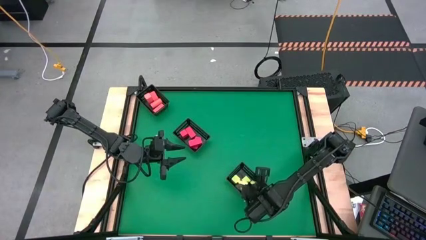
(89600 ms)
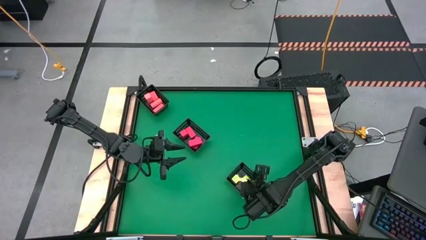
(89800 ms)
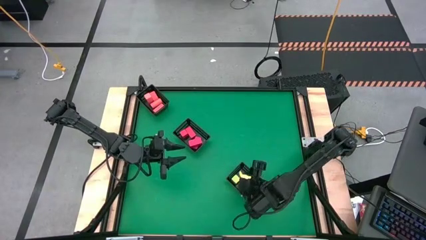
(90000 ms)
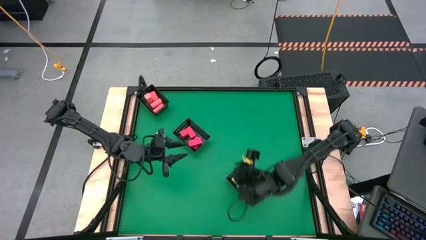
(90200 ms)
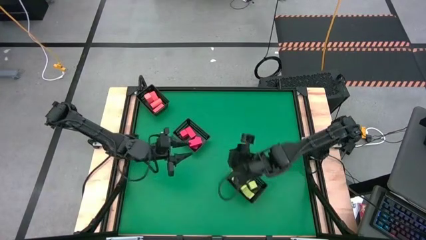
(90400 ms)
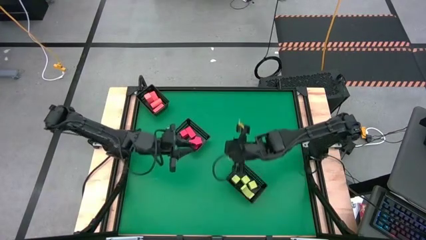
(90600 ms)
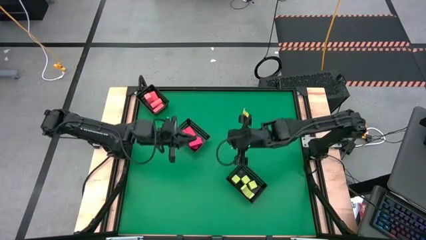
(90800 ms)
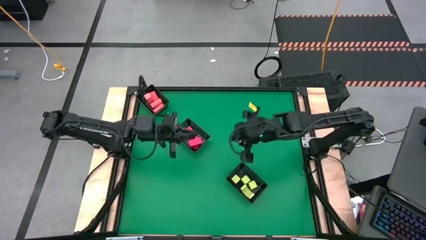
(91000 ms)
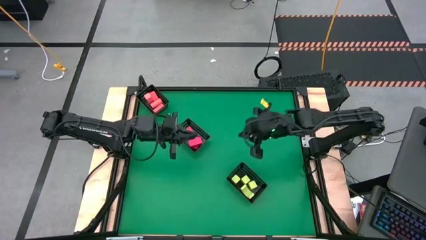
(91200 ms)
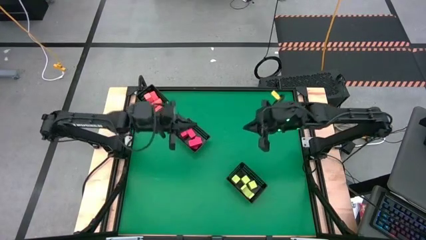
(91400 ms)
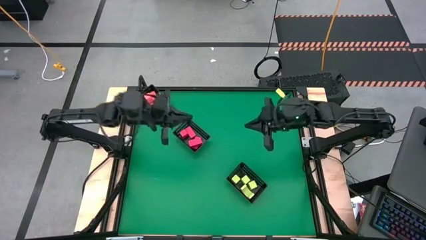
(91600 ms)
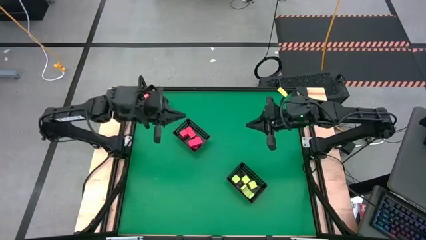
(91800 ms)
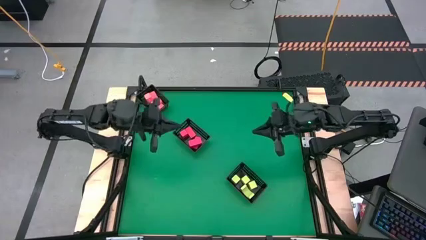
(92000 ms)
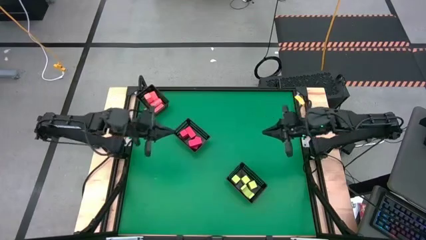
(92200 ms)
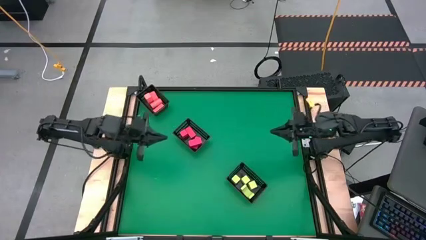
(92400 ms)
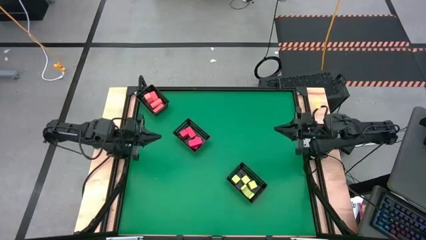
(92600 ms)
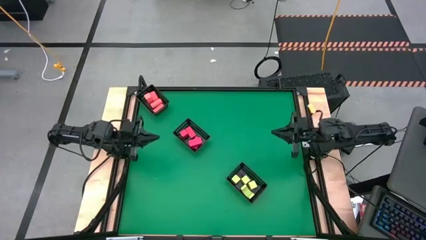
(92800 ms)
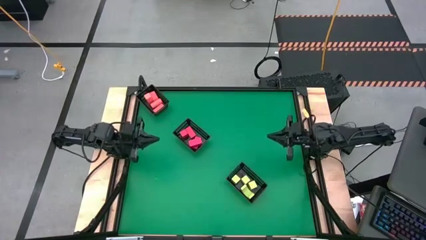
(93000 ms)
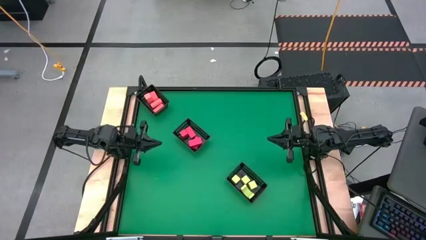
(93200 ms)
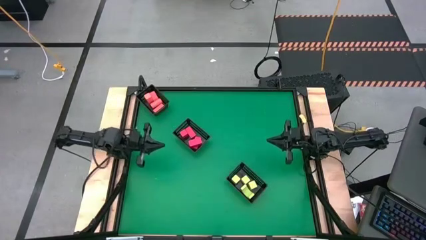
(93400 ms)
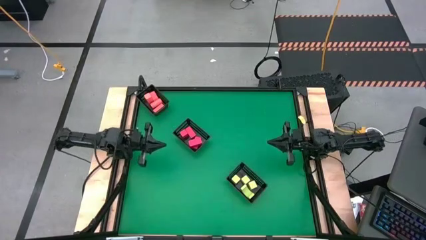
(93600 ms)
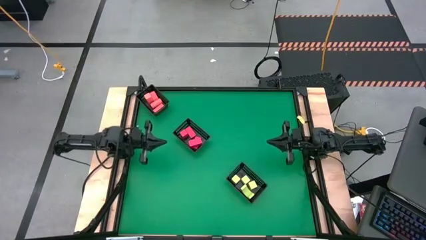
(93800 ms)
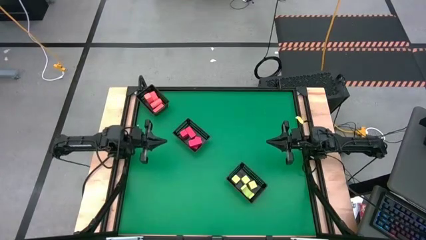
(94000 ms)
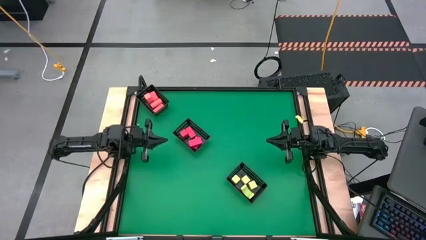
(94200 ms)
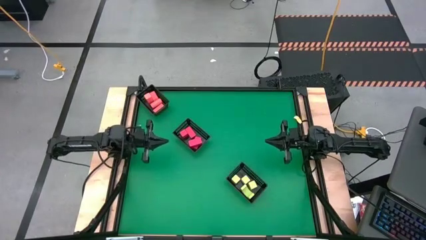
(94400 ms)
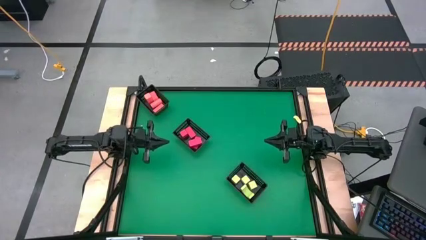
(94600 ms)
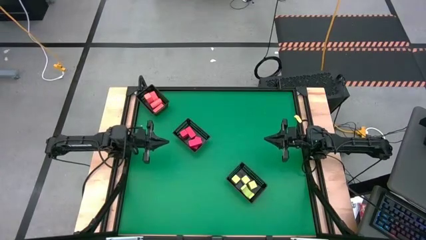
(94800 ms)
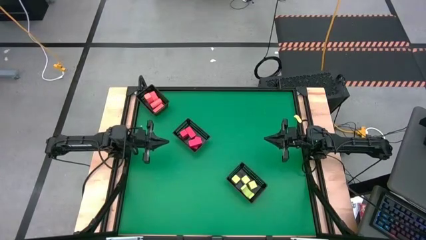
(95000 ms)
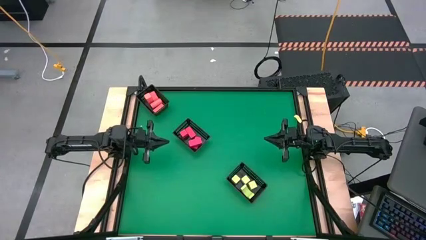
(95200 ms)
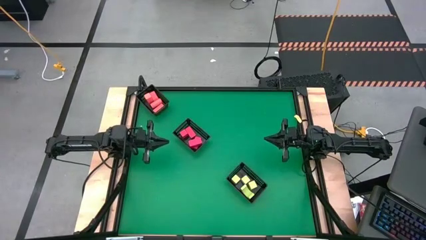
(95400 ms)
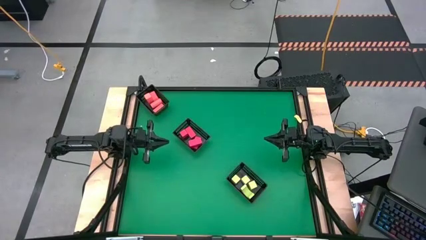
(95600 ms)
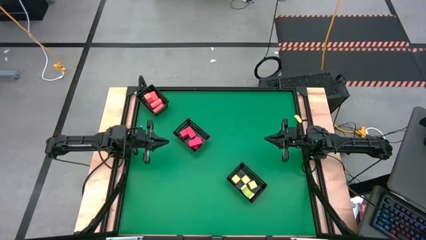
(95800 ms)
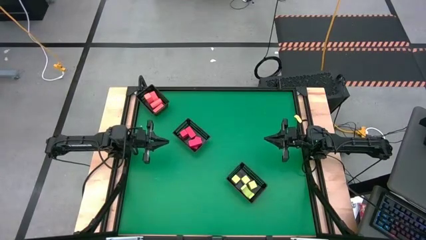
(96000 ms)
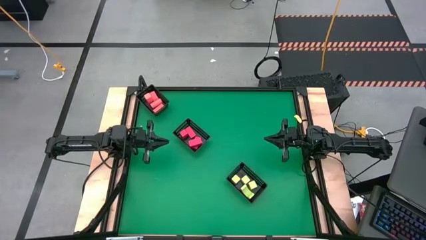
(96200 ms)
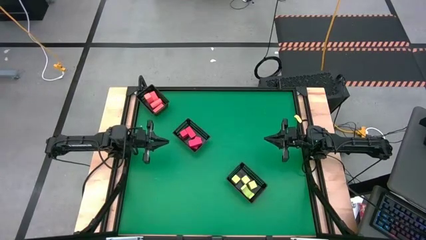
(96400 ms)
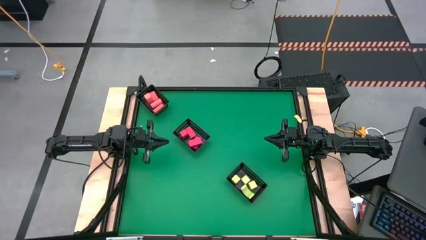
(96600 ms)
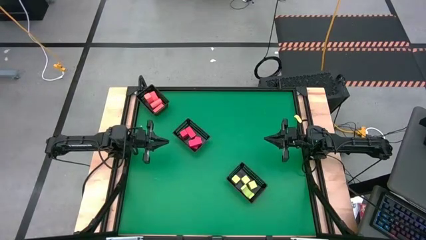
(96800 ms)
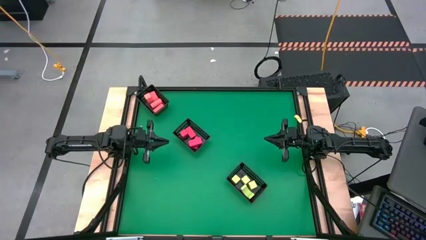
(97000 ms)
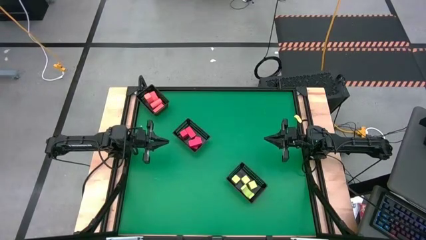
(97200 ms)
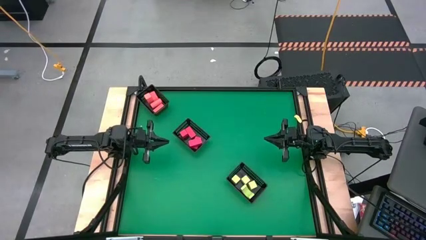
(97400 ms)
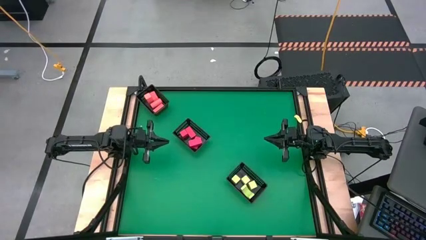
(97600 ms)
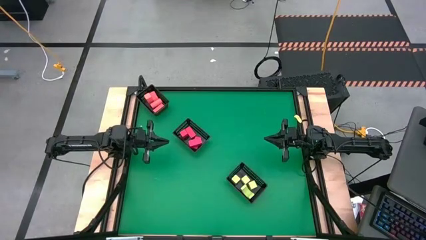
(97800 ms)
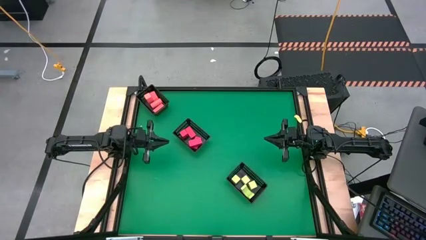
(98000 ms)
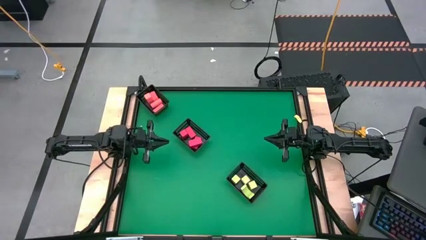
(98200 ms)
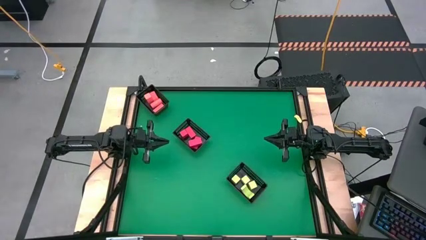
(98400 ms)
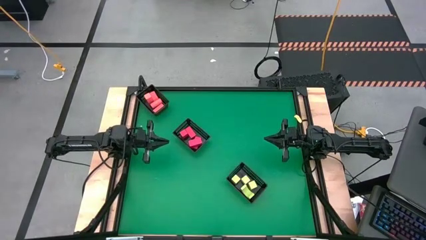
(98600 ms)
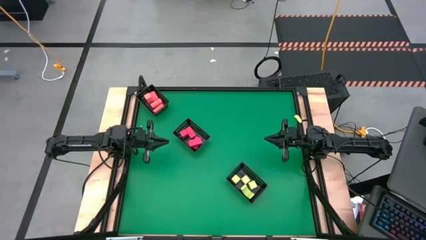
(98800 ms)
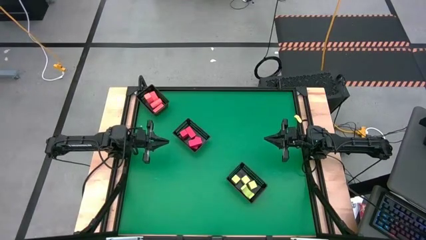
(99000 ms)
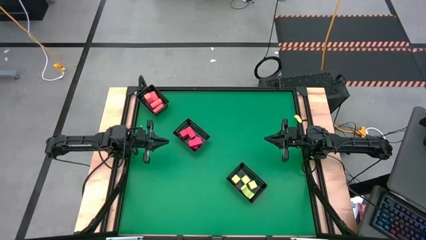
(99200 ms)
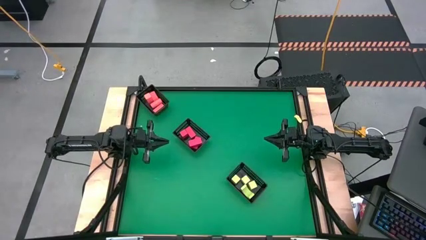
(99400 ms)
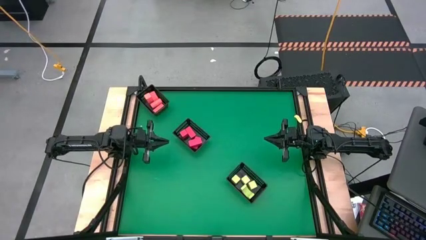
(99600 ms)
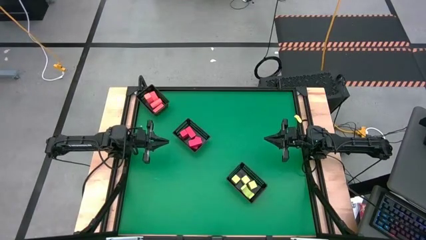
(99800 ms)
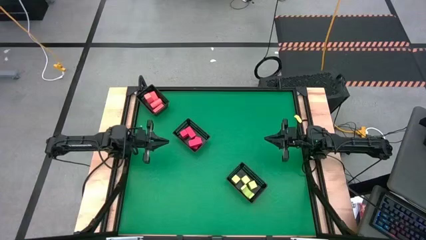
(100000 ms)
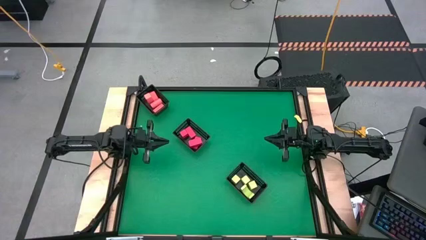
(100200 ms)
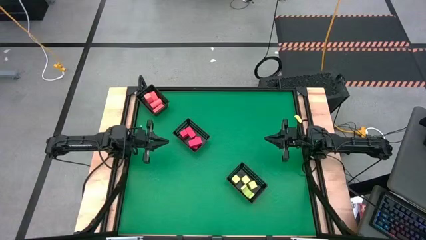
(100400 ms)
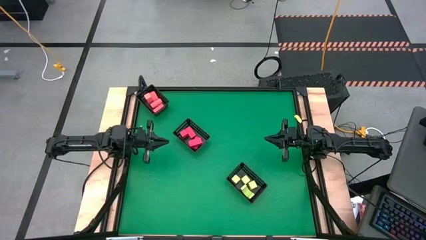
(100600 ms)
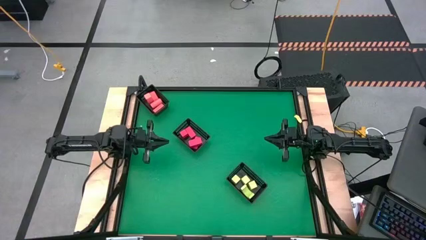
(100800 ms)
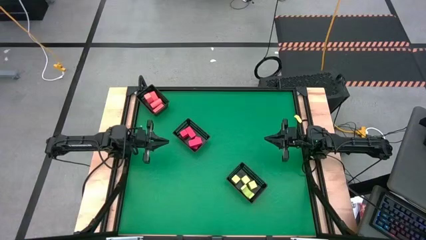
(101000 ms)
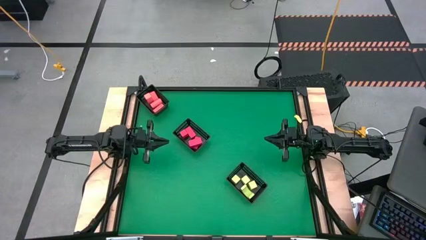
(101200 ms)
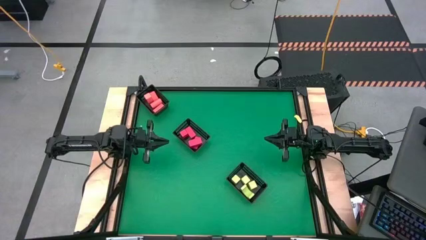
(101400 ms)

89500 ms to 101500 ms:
Task: Sort & place blocks by color
Return to Home Position

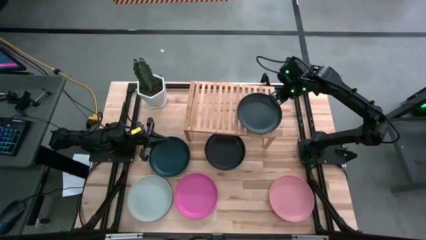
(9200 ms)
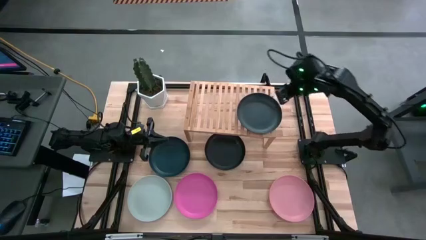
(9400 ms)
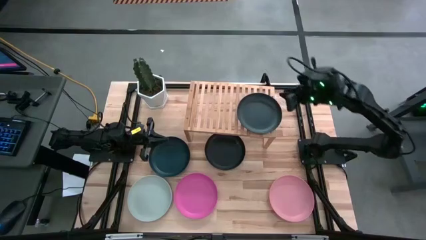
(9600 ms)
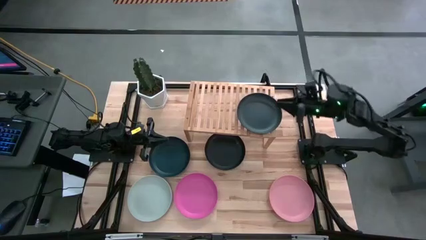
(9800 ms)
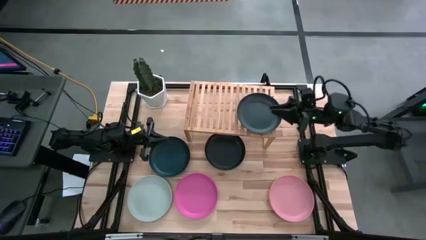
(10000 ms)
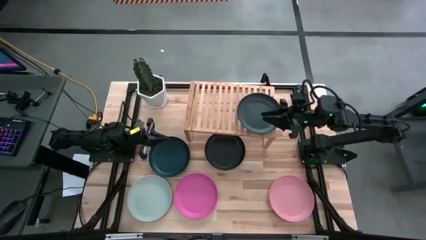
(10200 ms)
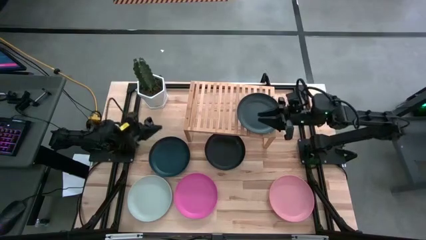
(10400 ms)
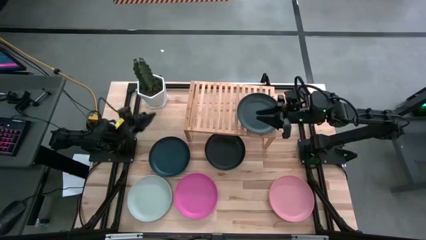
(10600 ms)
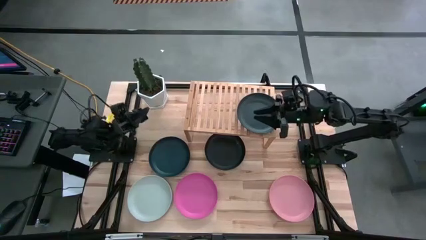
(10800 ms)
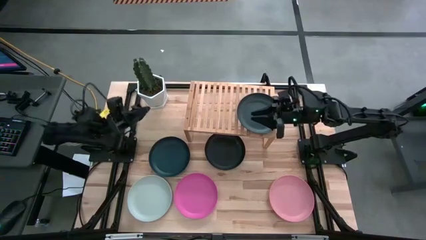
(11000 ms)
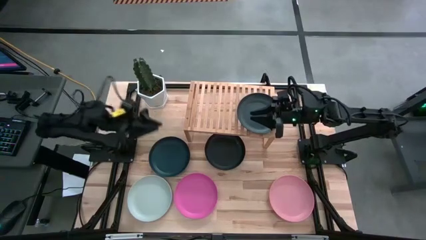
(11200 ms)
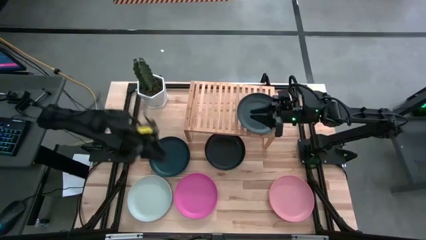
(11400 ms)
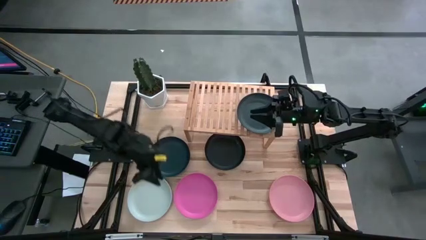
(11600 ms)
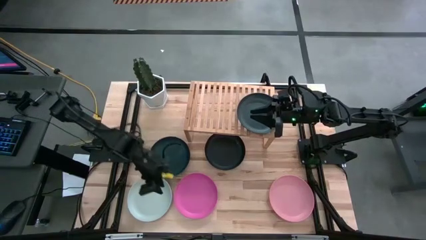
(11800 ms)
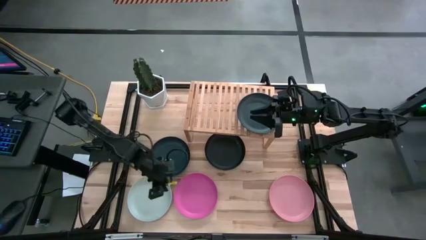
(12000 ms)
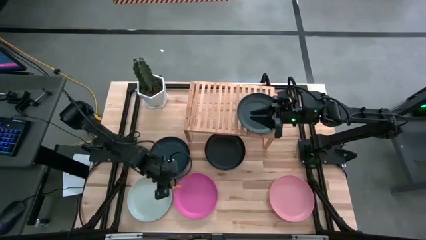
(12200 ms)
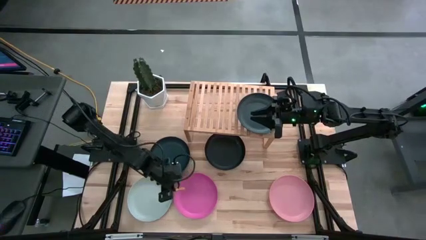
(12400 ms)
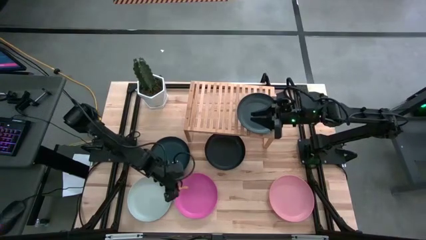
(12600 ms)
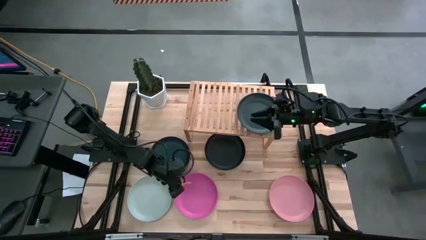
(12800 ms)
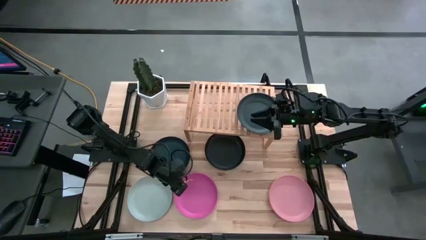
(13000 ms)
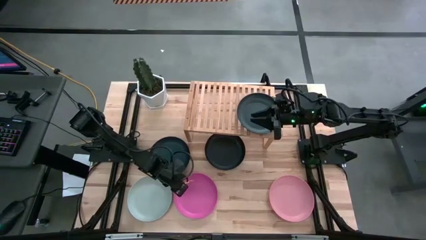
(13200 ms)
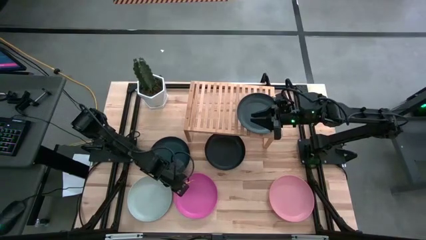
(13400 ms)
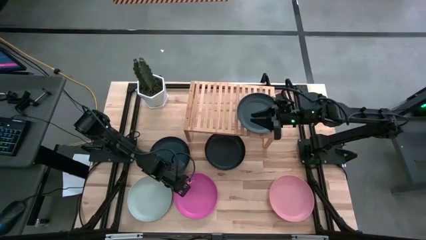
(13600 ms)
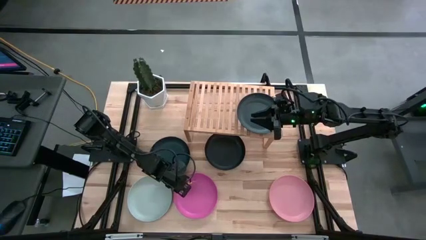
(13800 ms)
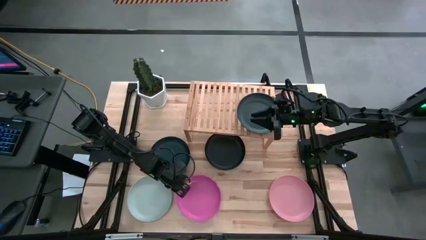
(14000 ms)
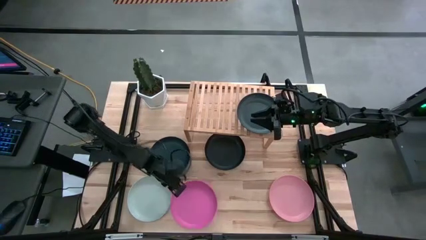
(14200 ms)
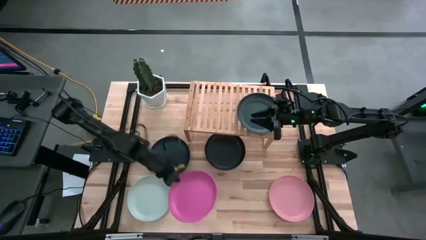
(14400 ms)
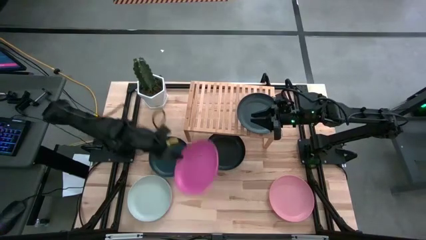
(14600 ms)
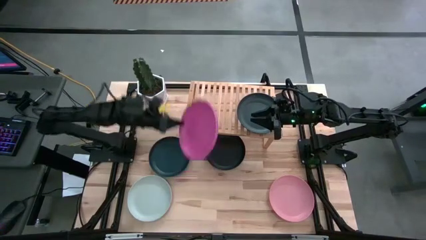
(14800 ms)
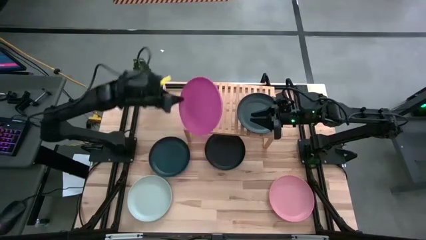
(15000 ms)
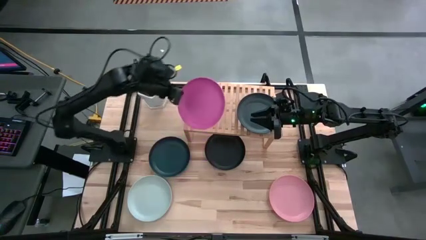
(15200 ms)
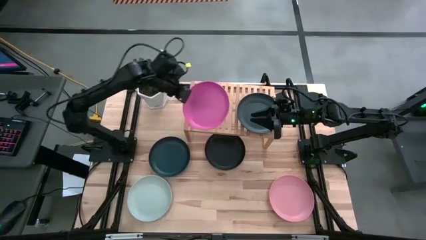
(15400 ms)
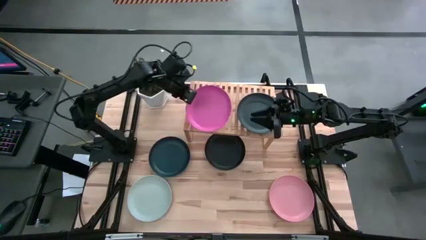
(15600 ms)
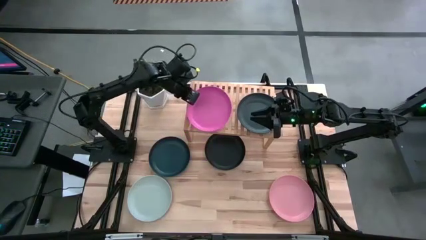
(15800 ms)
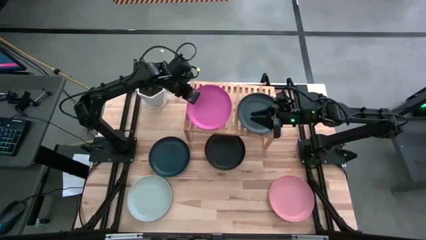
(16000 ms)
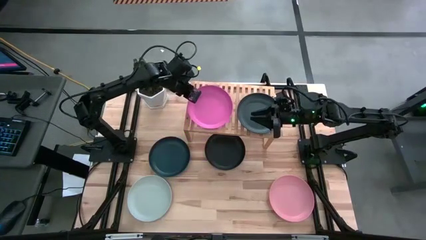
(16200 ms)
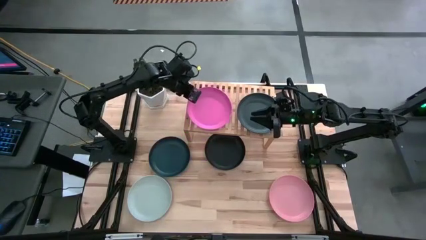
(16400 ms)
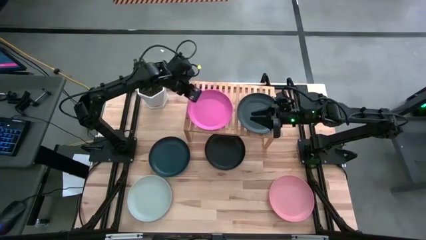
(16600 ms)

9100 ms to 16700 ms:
Task: Place and stack plates onto a shelf
Put the pink plate on the shelf
